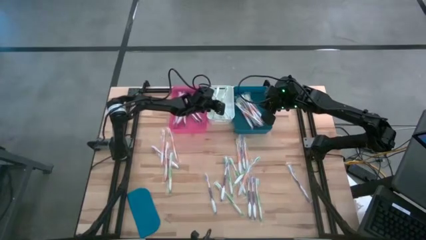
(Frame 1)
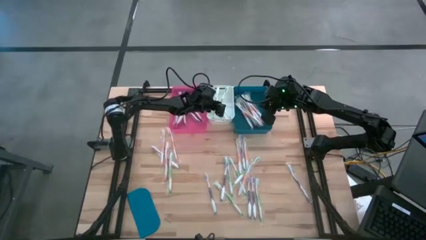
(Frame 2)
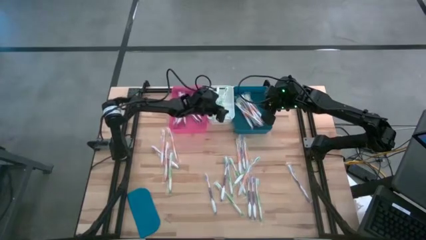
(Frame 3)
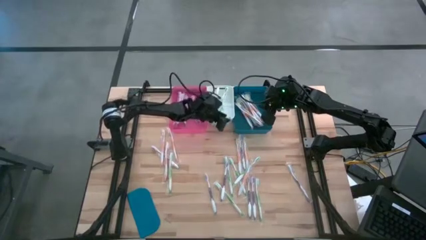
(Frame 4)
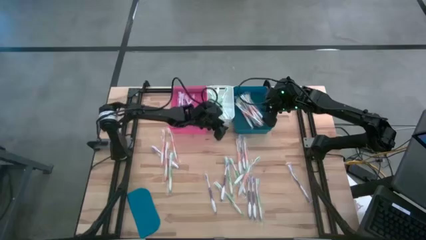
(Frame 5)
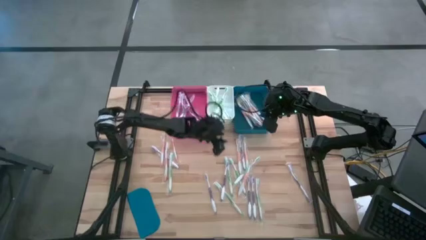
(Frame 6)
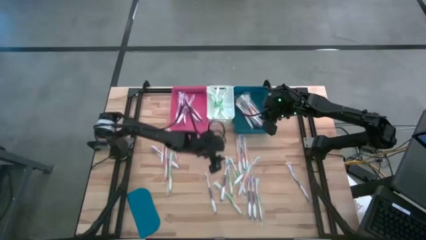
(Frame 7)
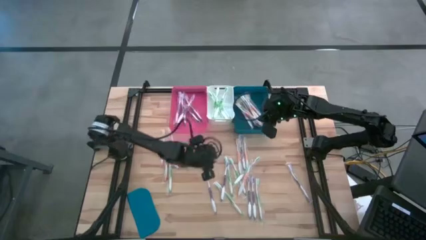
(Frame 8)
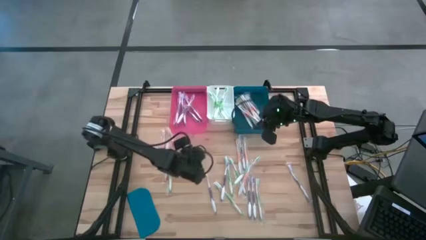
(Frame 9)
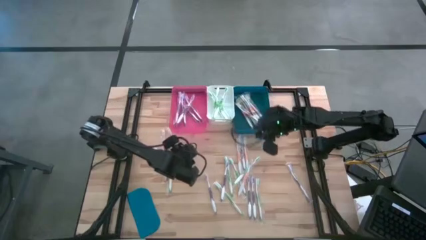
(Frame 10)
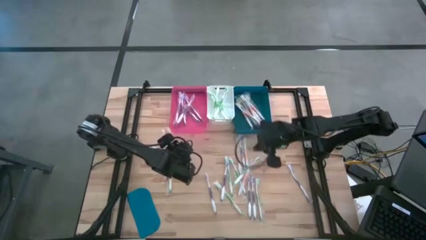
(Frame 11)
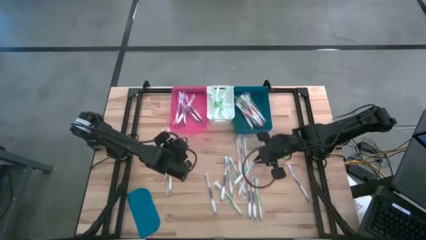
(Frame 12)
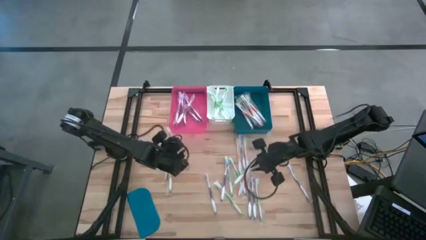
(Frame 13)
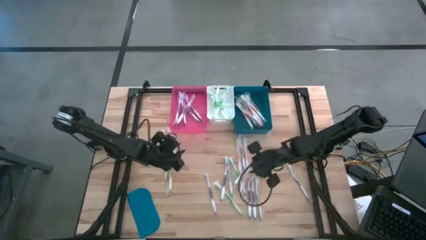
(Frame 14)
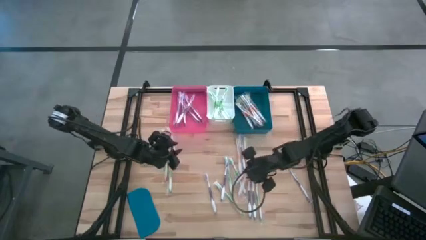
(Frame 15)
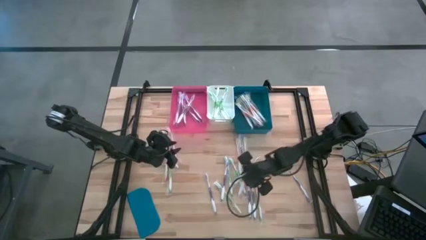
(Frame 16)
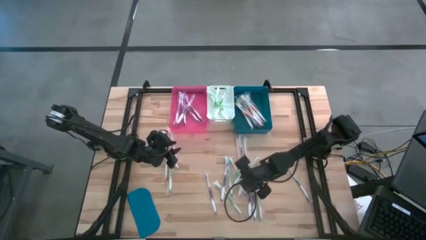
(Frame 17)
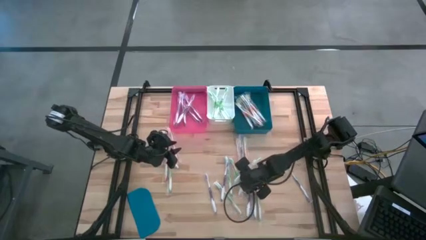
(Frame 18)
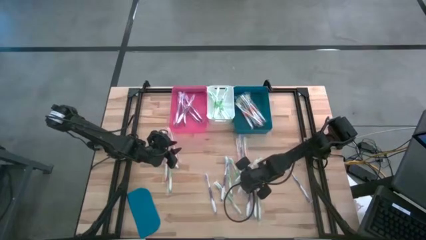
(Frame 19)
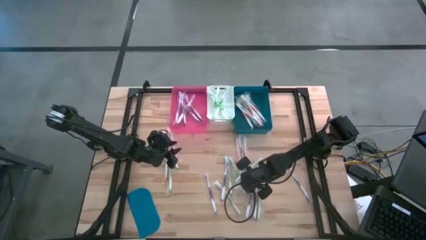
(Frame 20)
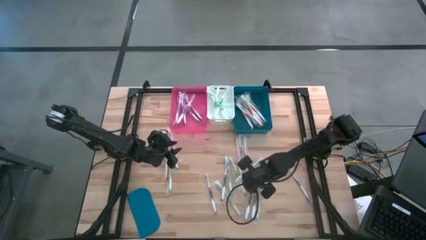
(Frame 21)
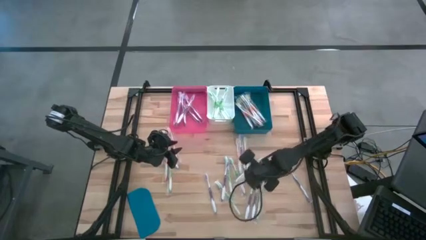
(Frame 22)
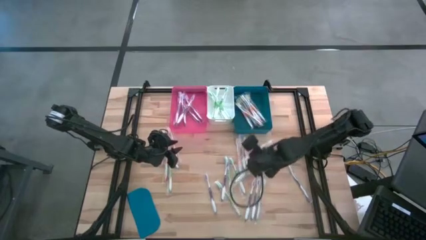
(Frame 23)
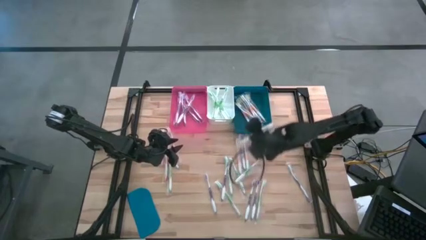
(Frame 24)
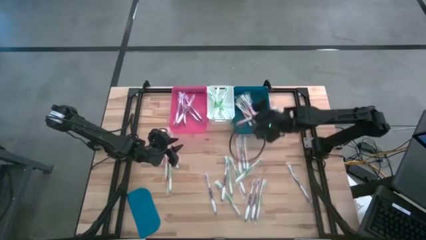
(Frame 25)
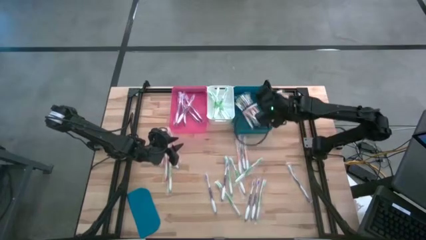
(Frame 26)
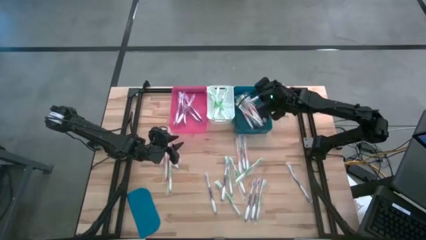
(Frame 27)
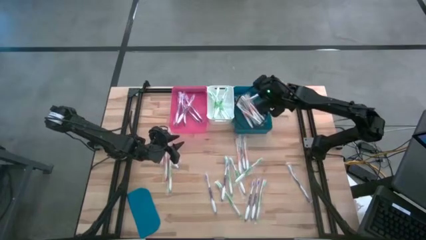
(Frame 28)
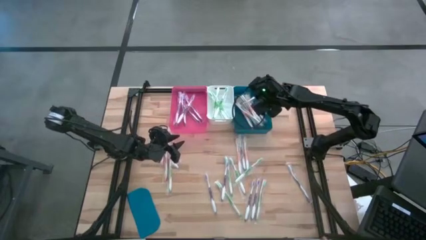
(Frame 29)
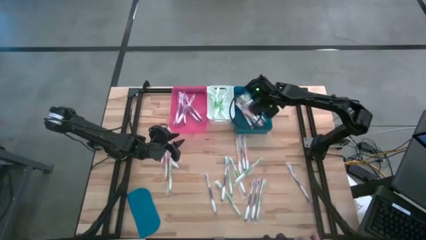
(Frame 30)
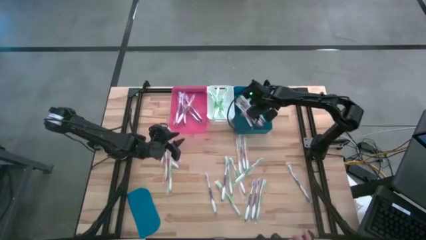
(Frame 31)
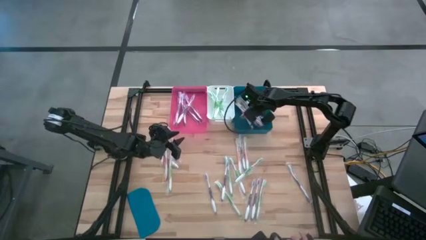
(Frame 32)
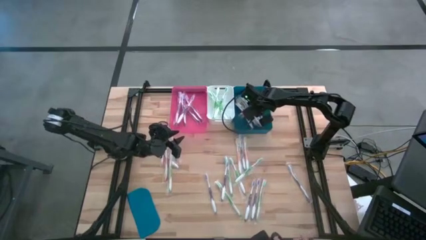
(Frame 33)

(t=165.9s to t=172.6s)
Task: Pick & Place Toothbrushes
Put the orange toothbrush into the blue bin

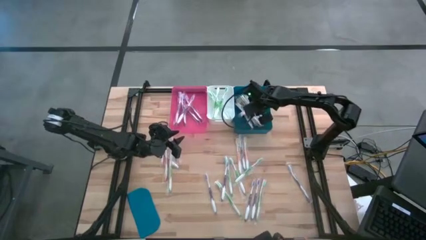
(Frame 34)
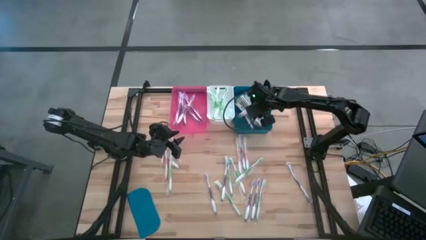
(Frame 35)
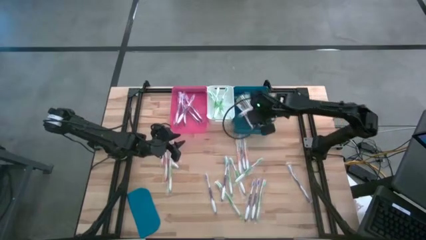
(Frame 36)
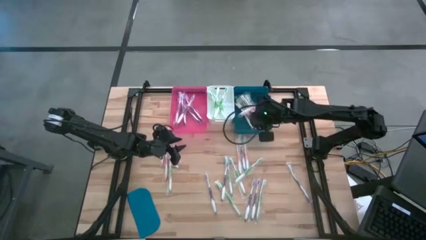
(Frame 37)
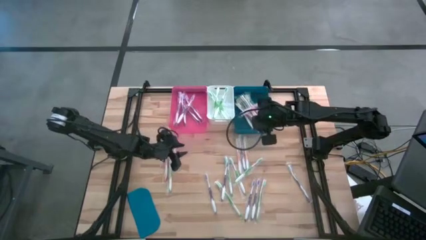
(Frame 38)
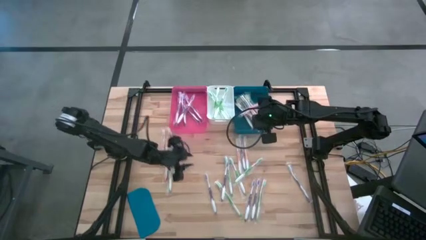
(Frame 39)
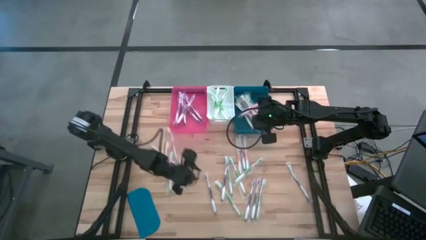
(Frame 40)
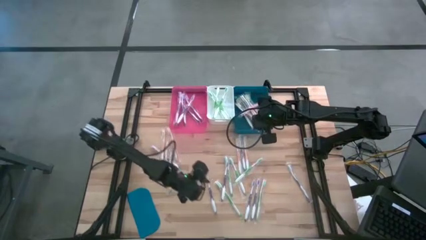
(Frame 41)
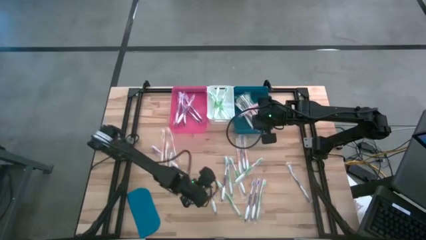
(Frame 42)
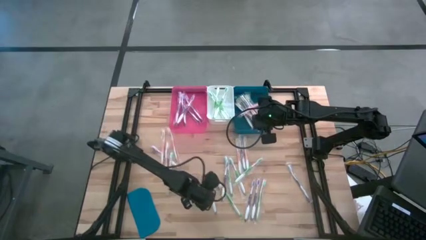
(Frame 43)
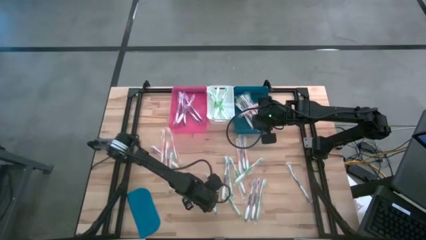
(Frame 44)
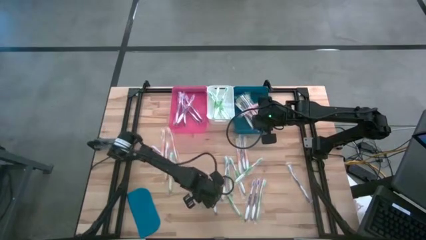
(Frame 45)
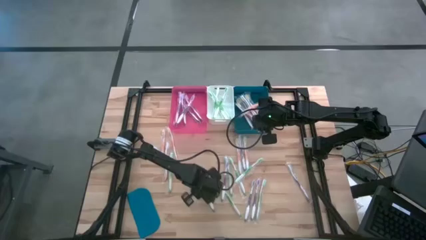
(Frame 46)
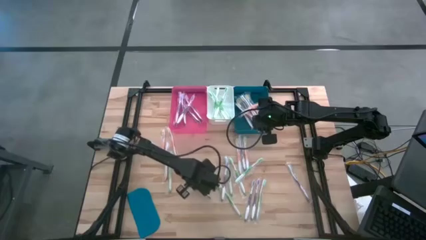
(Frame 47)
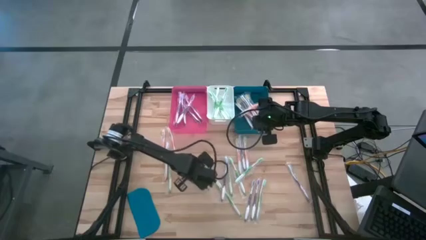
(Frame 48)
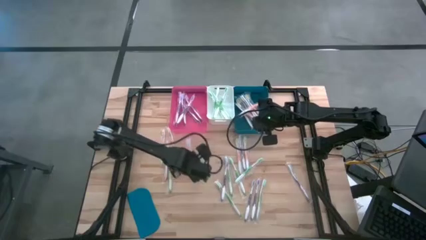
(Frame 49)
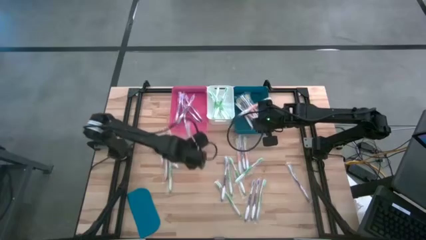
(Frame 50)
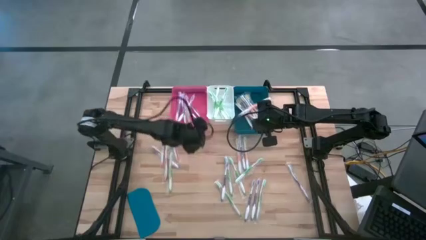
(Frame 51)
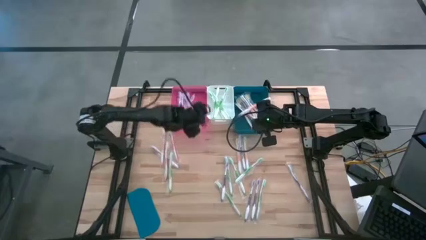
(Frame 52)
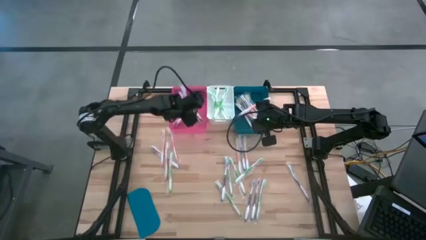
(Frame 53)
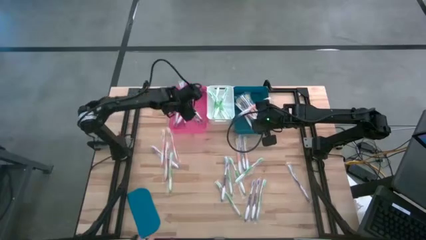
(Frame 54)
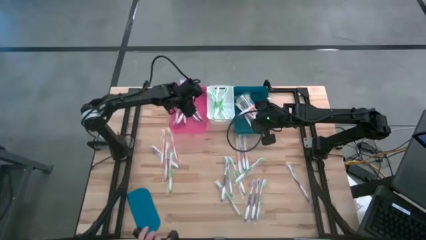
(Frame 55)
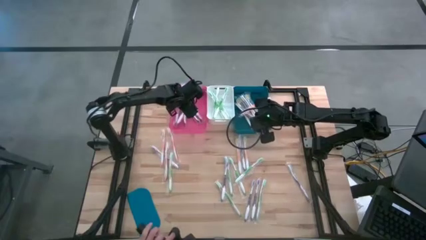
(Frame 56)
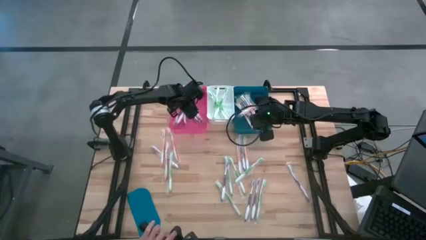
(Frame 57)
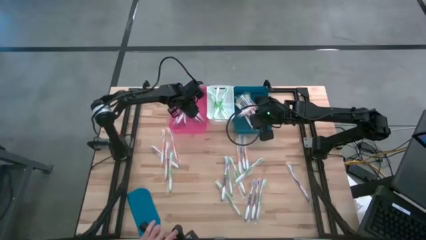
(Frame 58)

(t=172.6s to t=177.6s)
Put the violet toothbrush into the pink bin

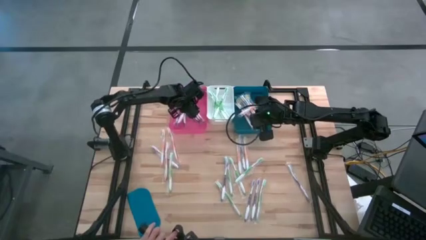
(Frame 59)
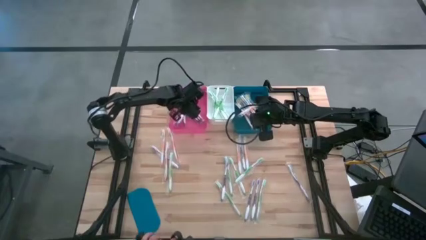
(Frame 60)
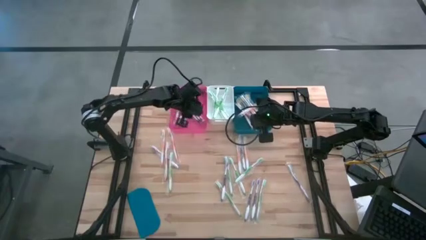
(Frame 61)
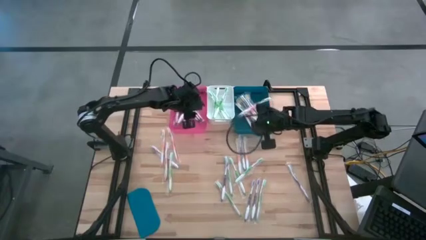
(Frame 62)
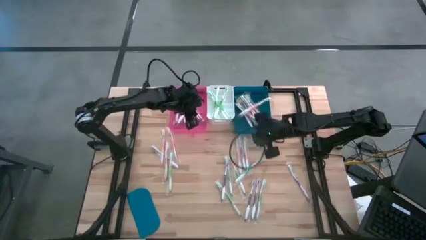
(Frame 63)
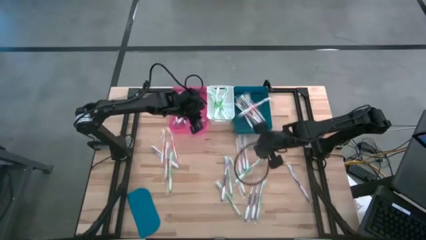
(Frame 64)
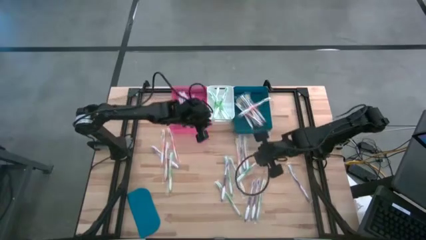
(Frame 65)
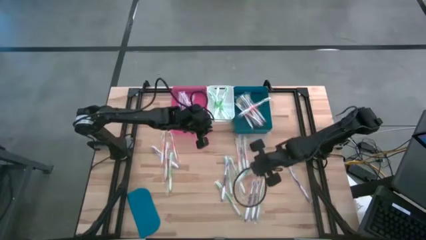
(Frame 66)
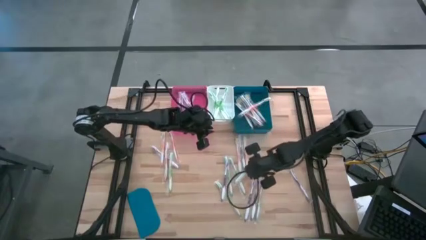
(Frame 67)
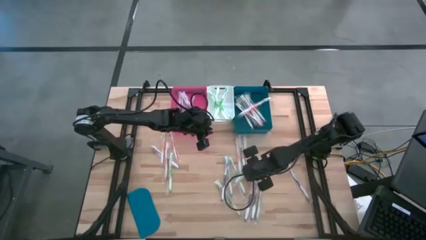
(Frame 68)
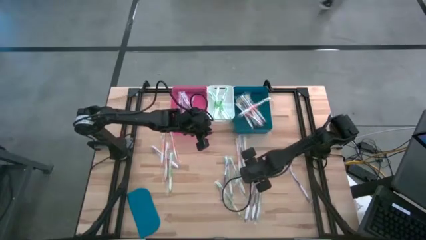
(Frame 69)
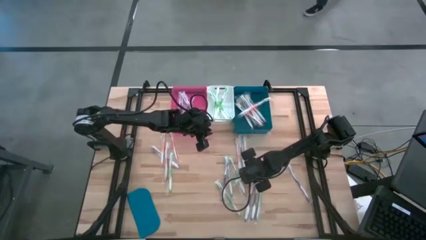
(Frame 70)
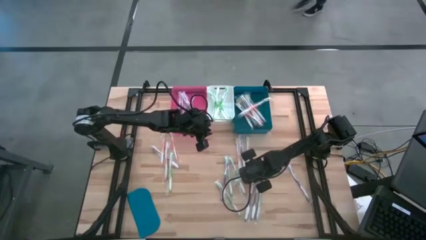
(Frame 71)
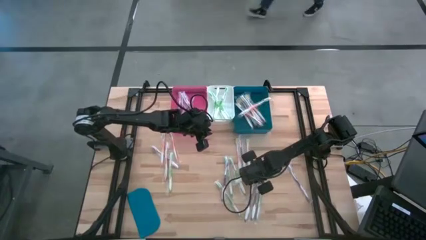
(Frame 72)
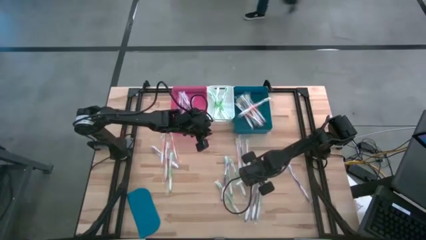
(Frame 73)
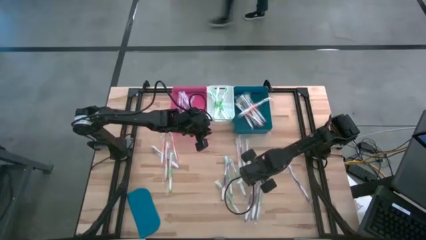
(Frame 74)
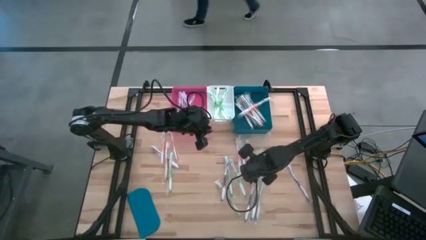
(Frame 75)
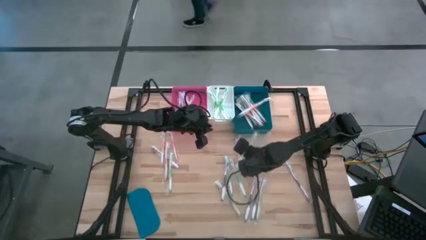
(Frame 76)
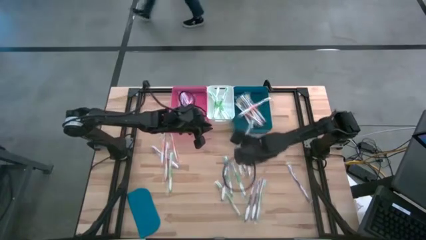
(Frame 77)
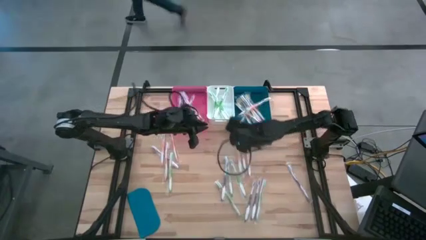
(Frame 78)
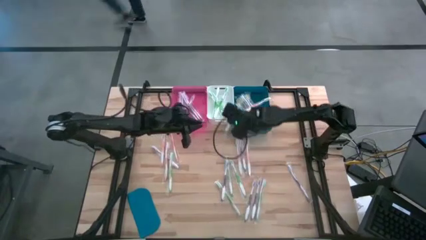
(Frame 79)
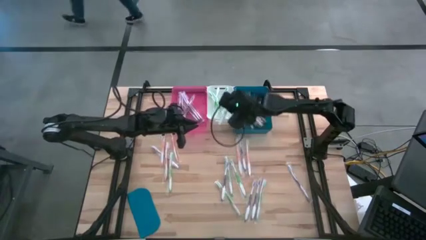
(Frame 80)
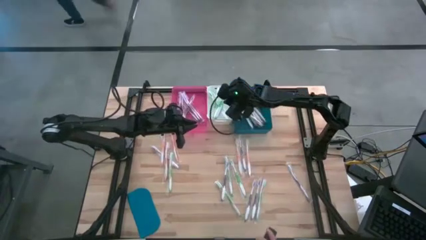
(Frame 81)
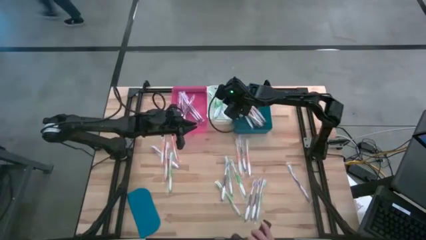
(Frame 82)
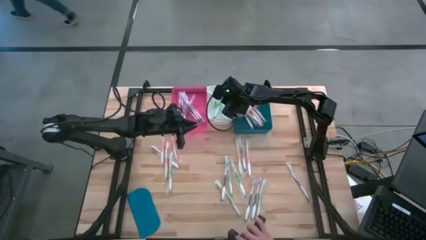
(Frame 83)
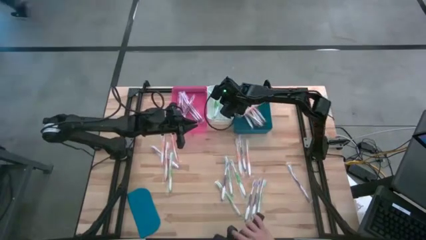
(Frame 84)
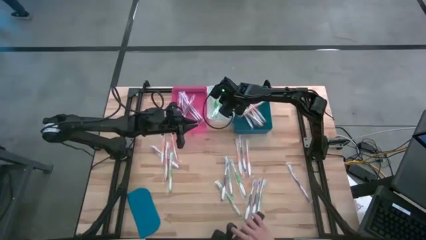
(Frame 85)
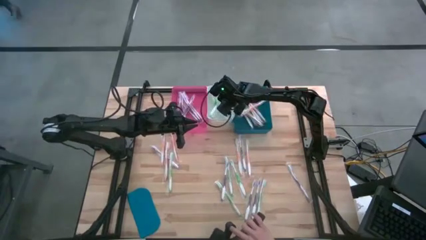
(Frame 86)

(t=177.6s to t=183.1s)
Put the green toothbrush into the white bin
